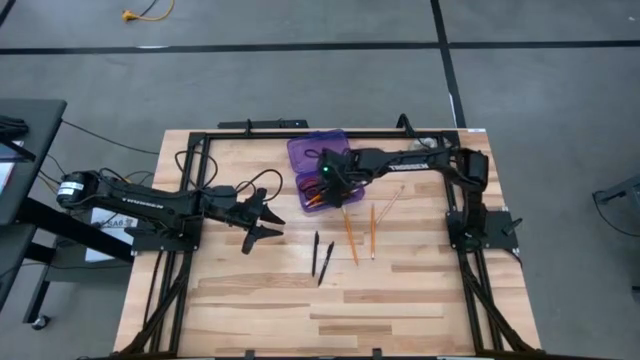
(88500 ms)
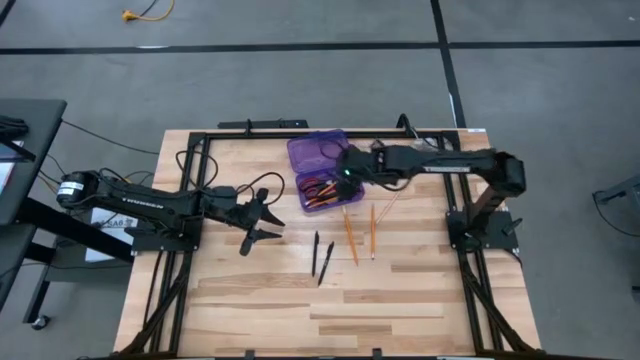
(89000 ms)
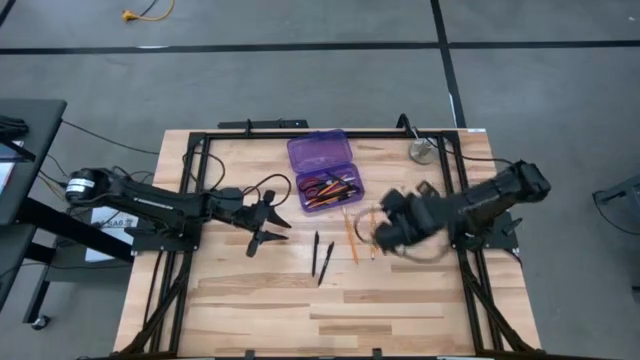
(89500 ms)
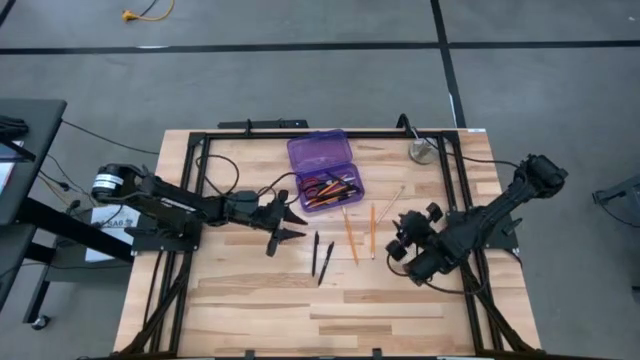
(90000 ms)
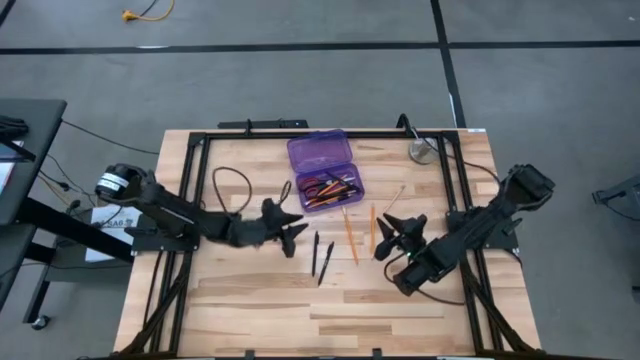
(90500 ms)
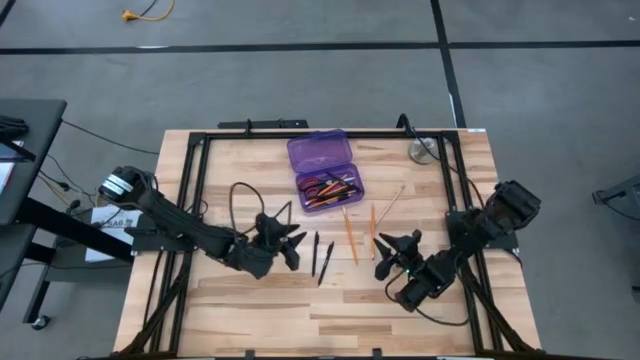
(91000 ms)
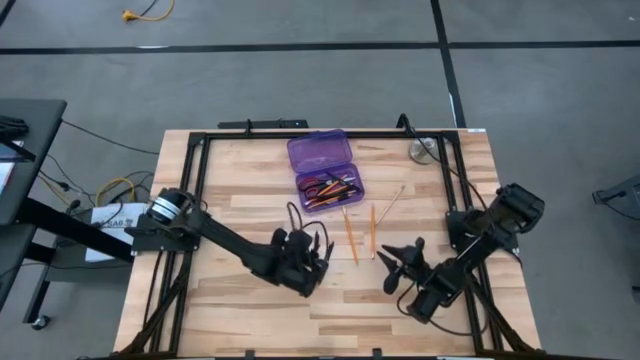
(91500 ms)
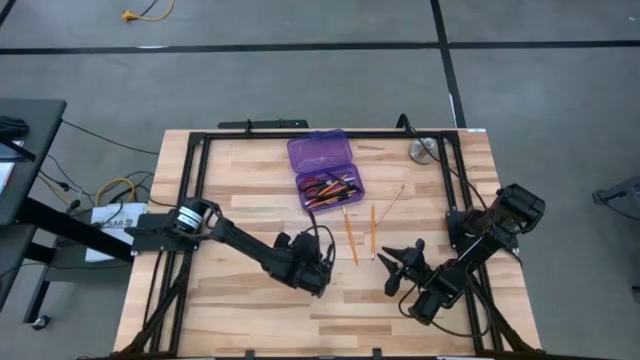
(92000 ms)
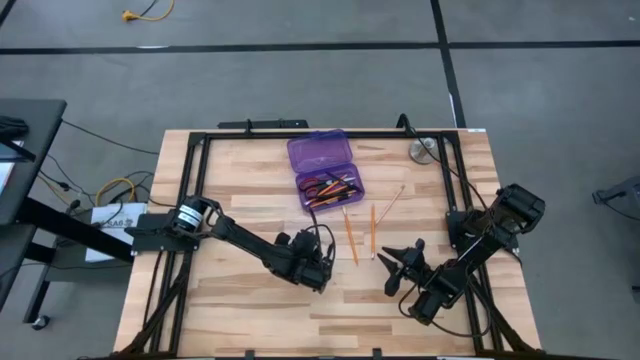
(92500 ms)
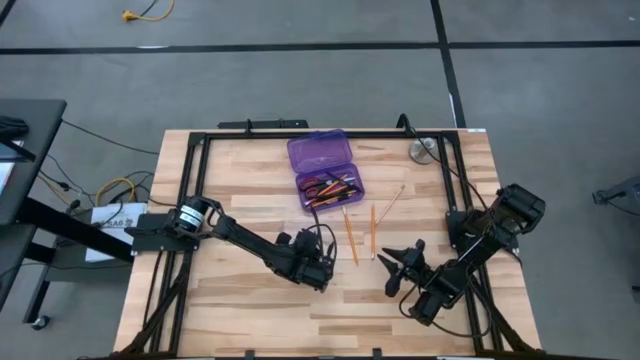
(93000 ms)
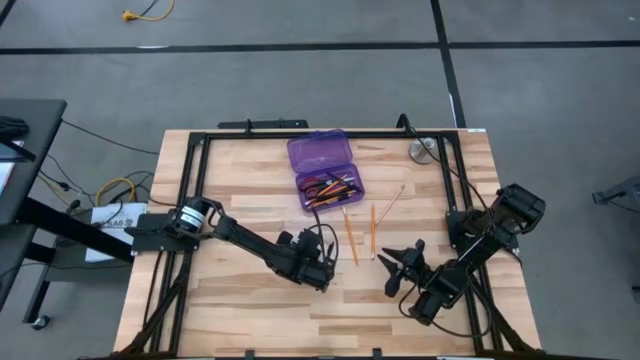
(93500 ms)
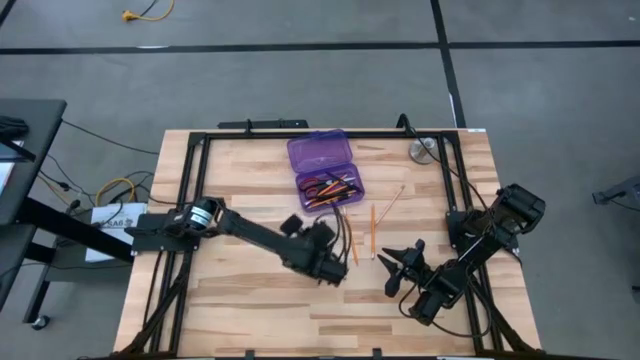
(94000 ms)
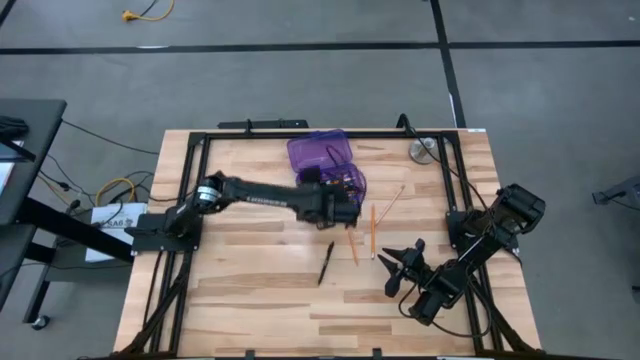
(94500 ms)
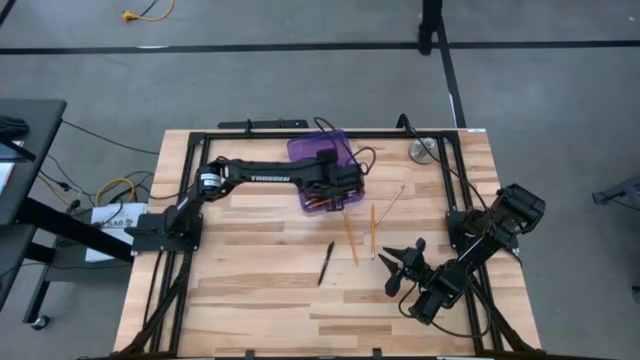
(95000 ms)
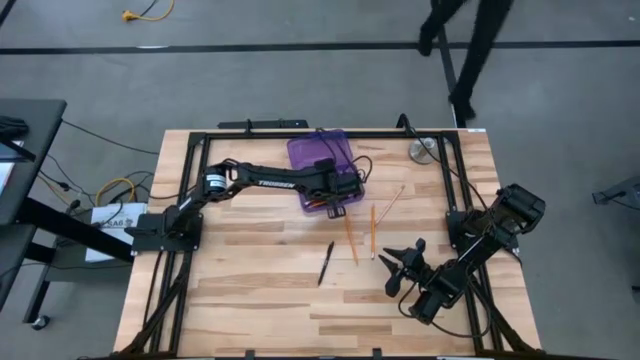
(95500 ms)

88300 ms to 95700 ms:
Task: Pick & place school supplies into a supply box
Put the black pen into the purple supply box

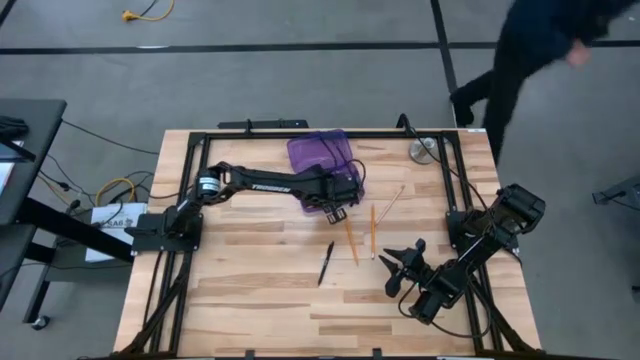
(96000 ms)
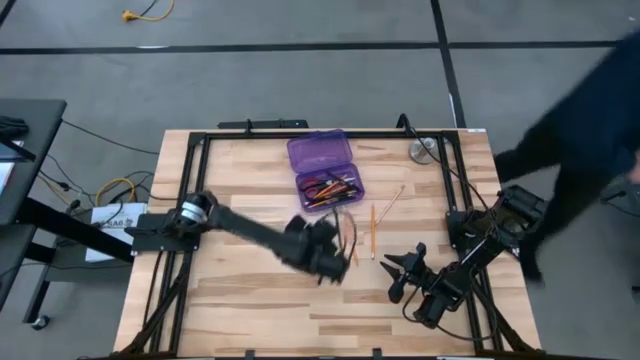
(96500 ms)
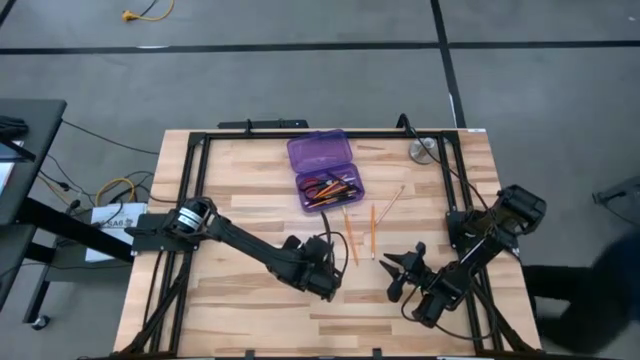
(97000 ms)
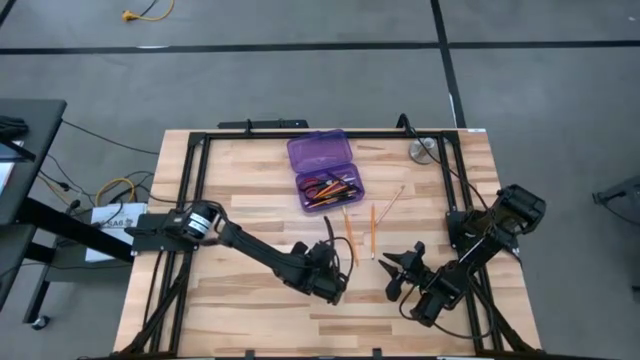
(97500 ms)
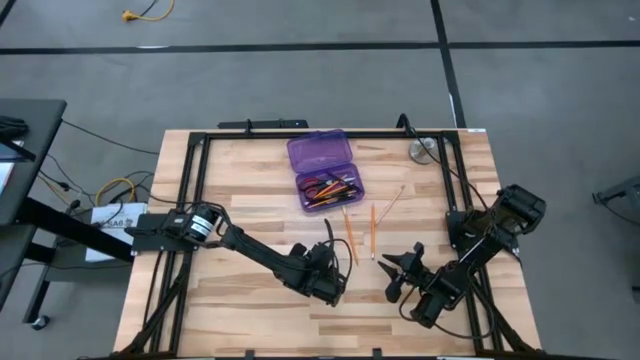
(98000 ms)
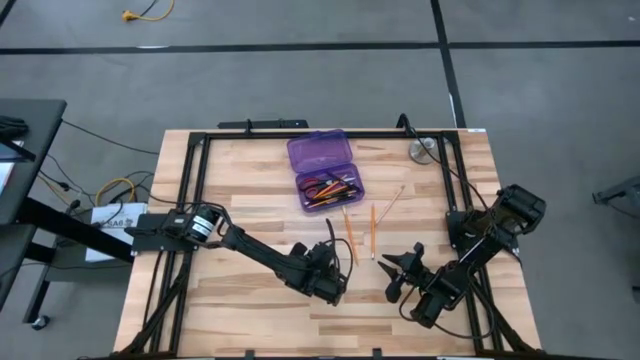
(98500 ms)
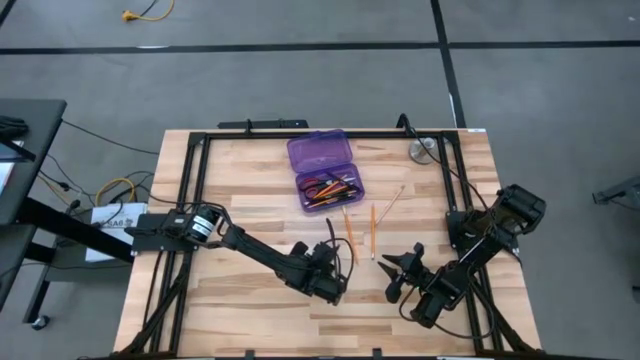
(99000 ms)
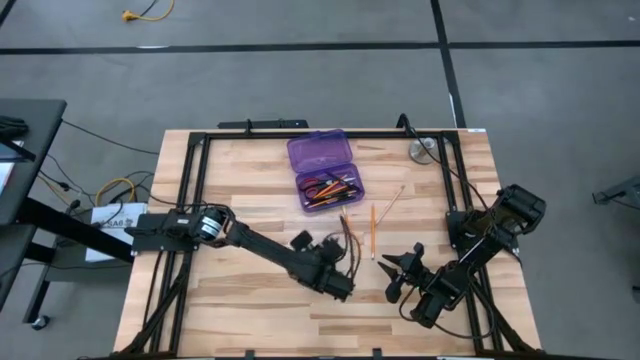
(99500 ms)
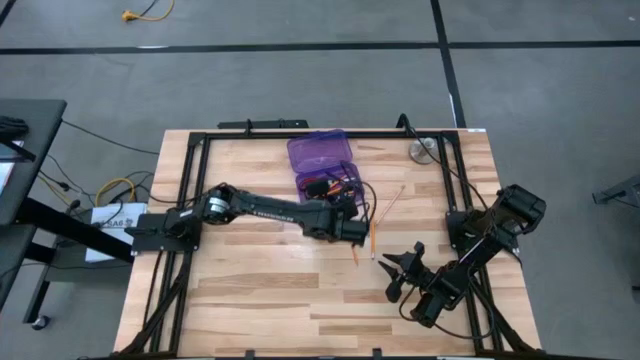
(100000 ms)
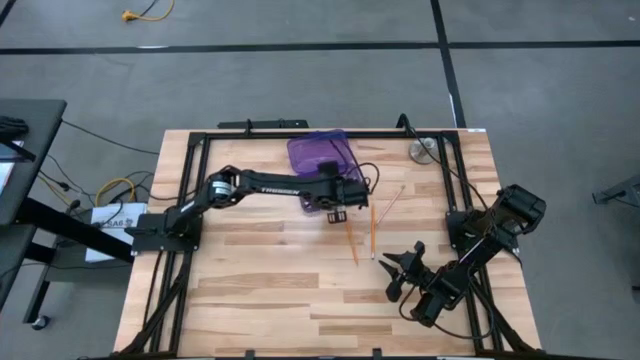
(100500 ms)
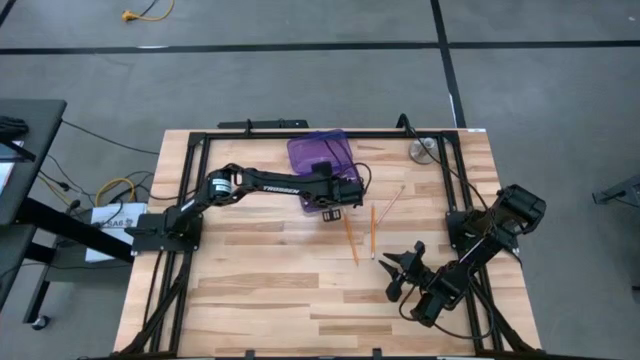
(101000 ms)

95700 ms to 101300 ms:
Put the black pen into the purple supply box

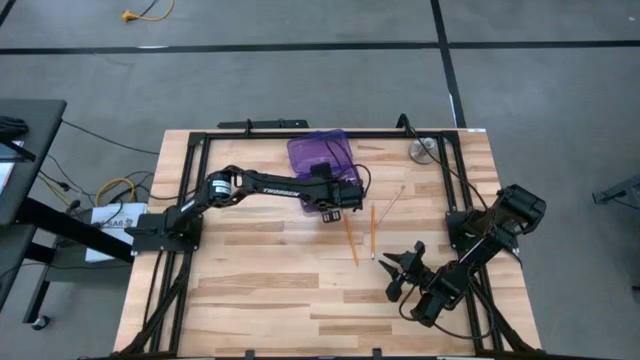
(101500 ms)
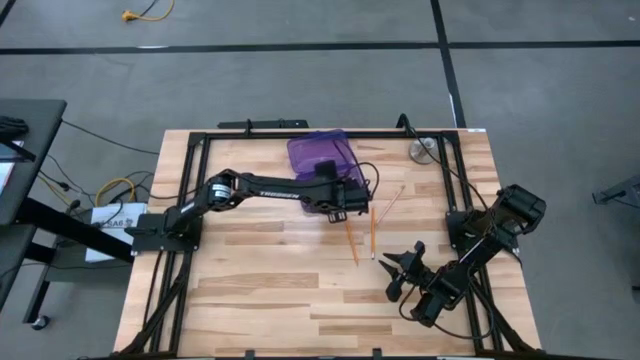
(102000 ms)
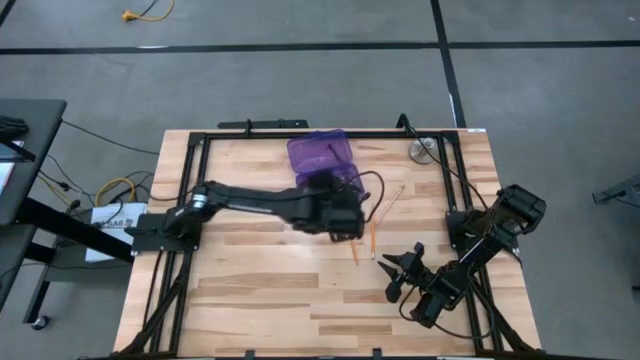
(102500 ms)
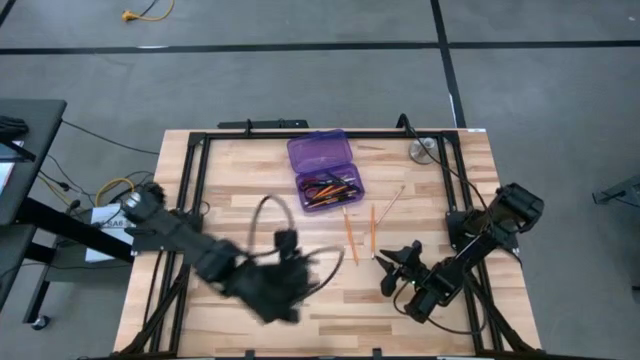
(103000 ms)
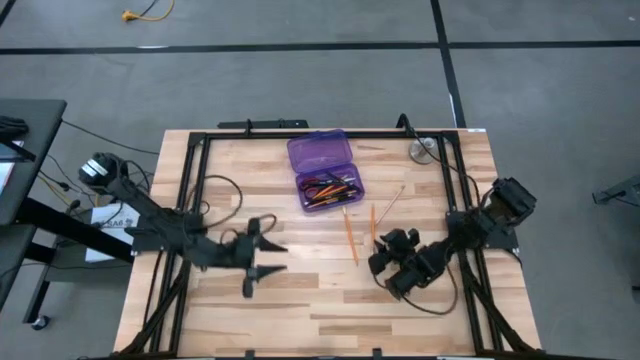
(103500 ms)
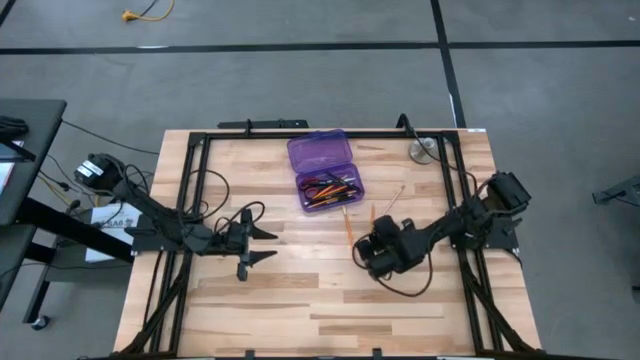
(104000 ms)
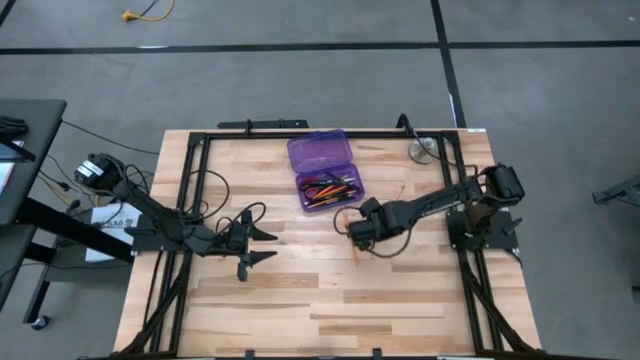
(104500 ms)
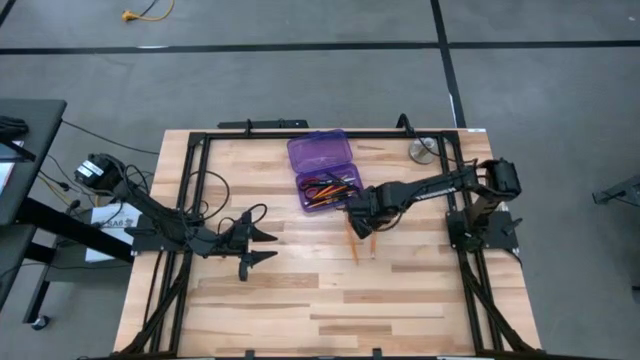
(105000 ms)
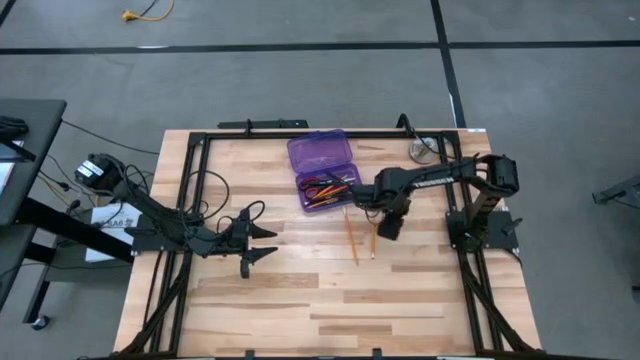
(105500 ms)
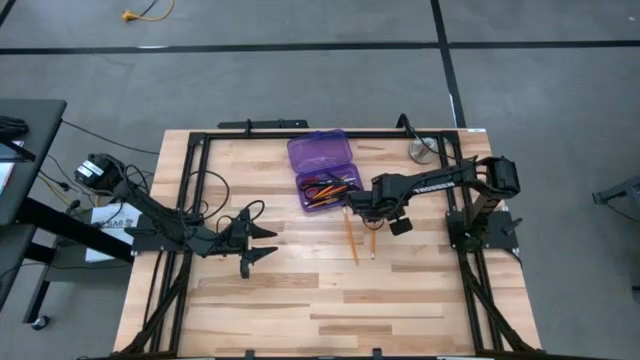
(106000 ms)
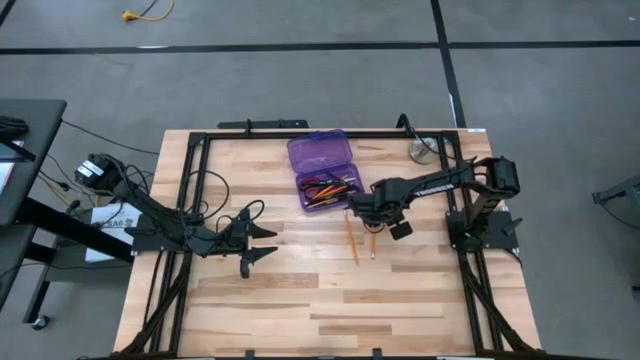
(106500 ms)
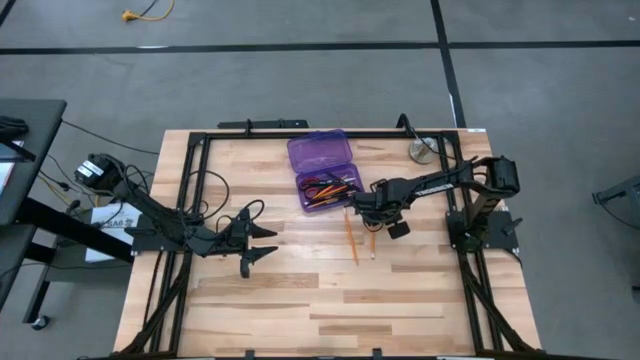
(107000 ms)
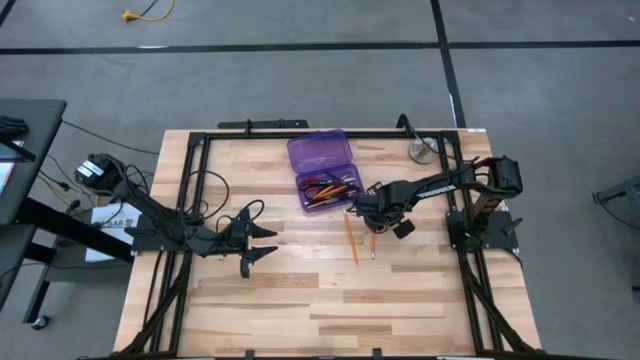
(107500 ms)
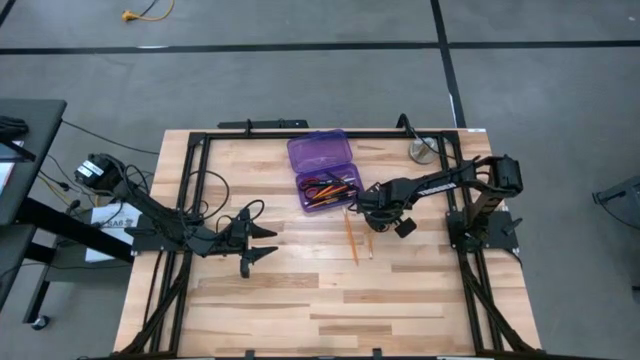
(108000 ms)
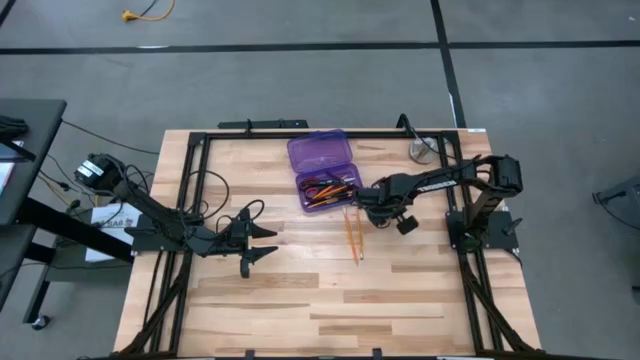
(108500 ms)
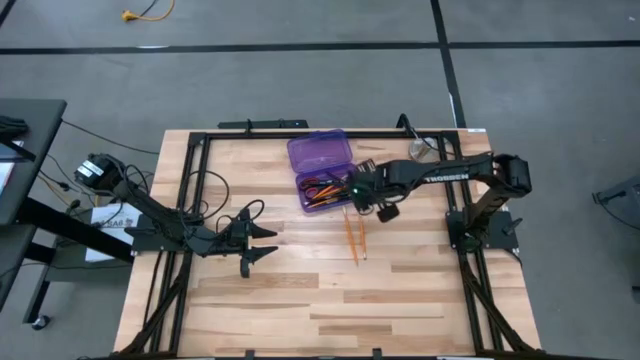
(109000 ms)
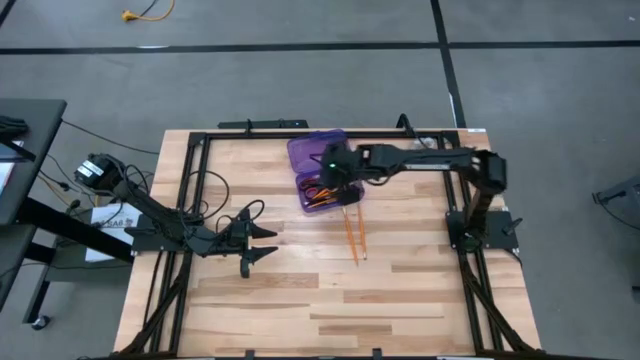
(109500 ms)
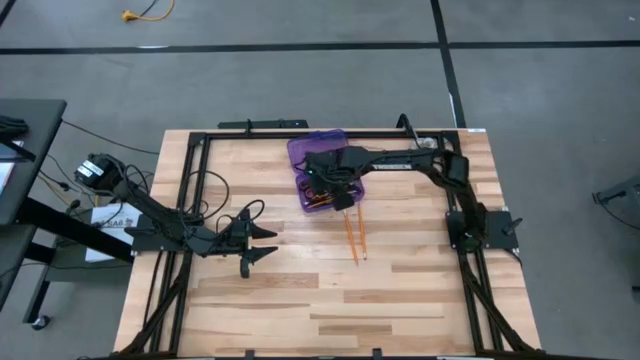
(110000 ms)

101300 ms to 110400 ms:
Put the light pink pencil into the purple supply box
